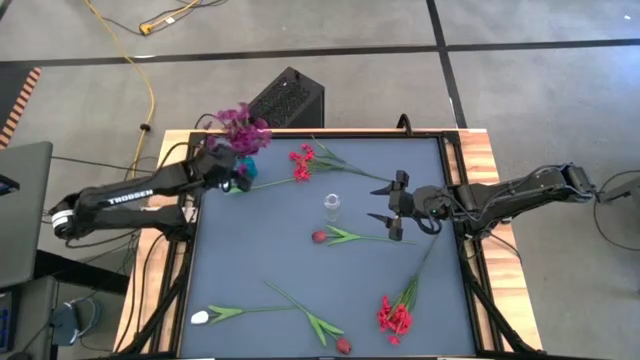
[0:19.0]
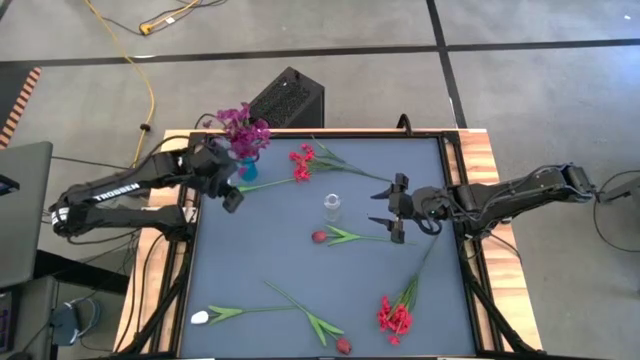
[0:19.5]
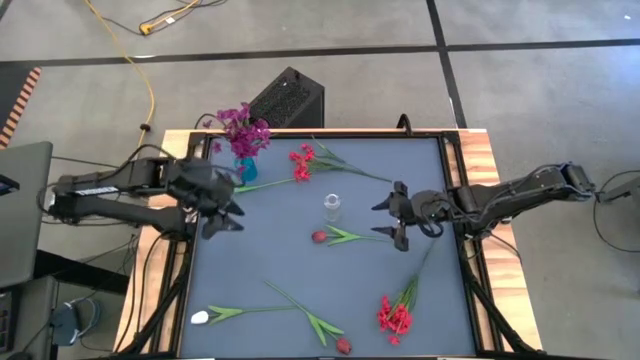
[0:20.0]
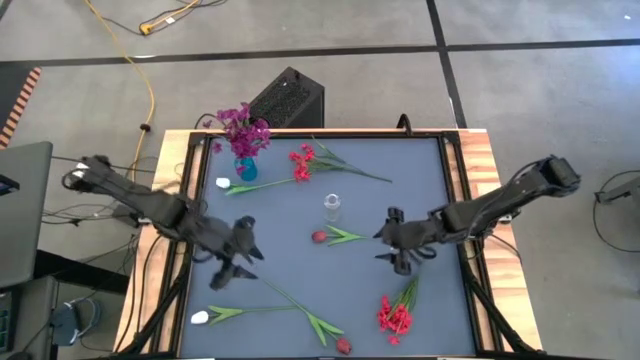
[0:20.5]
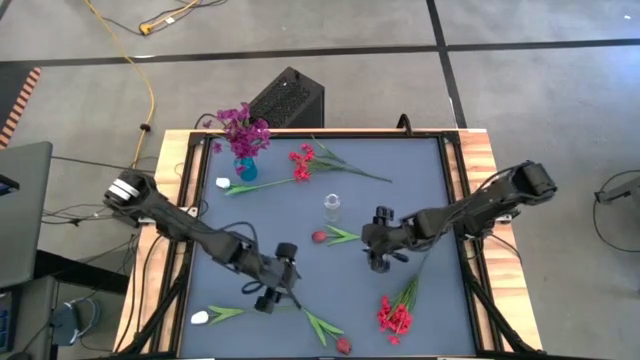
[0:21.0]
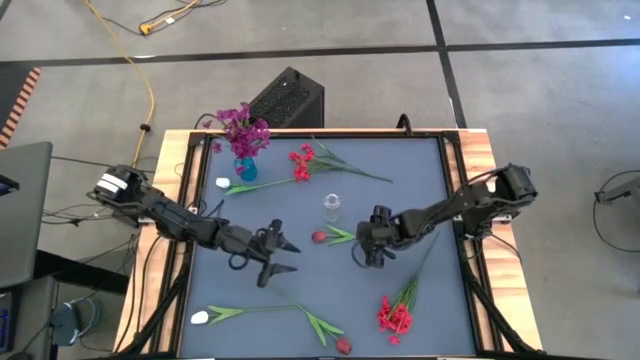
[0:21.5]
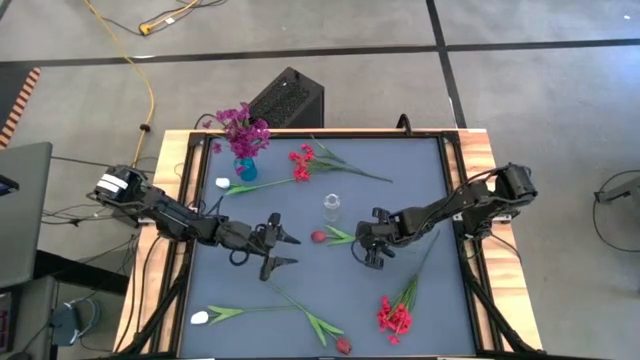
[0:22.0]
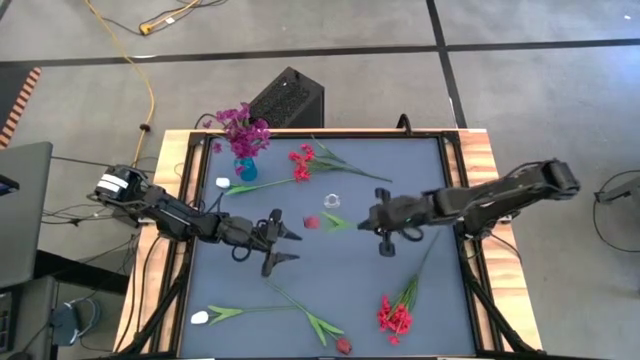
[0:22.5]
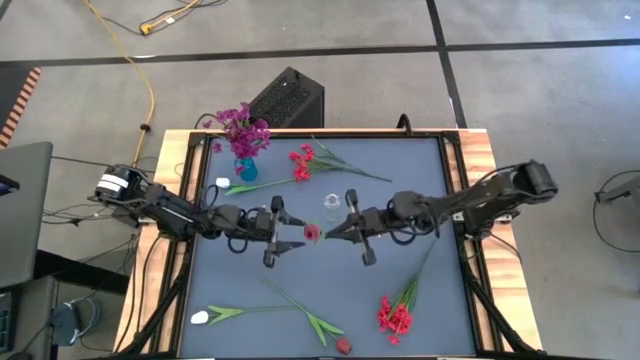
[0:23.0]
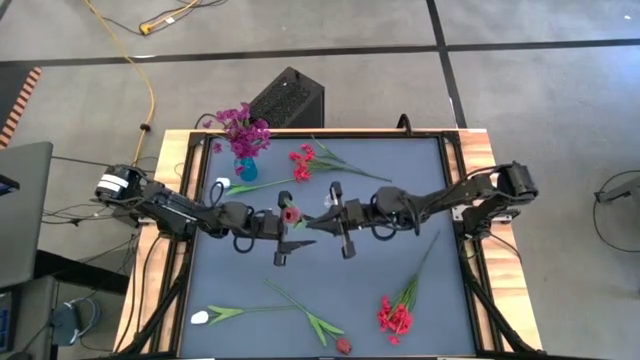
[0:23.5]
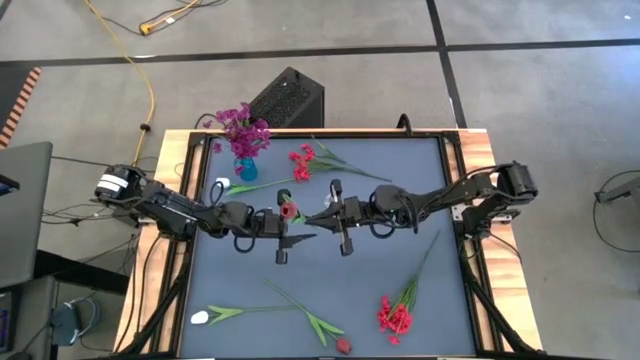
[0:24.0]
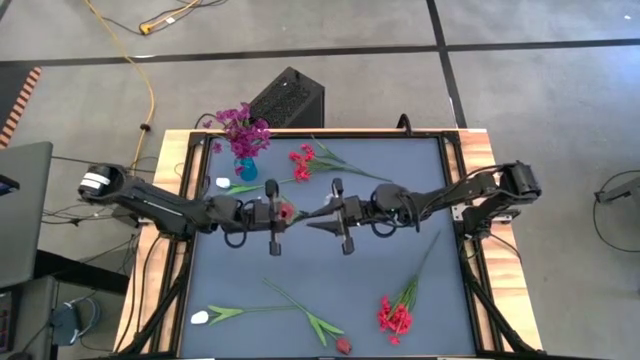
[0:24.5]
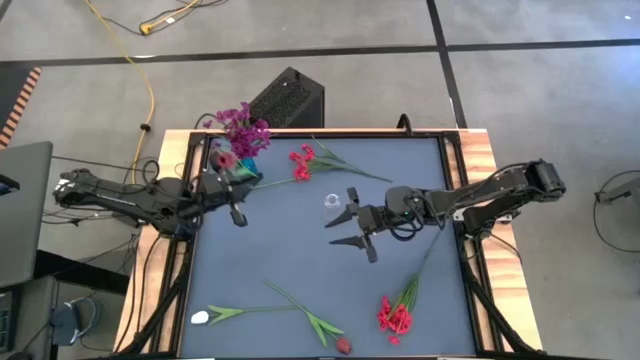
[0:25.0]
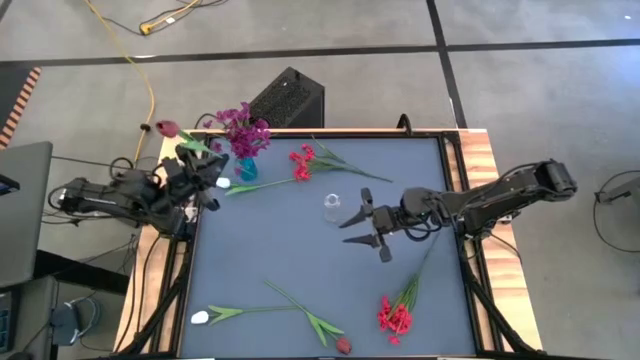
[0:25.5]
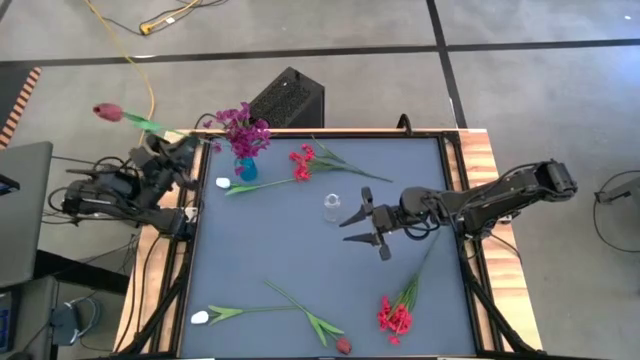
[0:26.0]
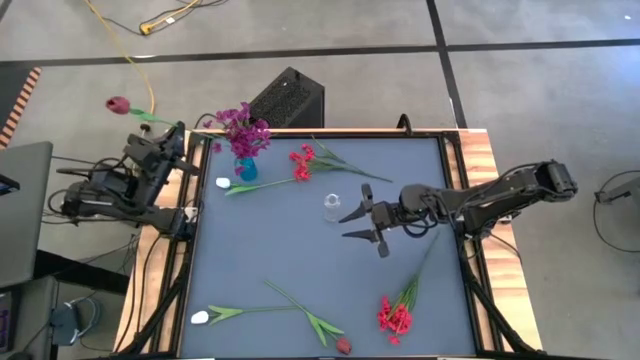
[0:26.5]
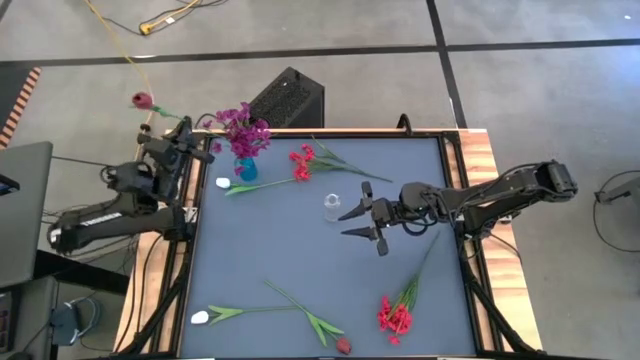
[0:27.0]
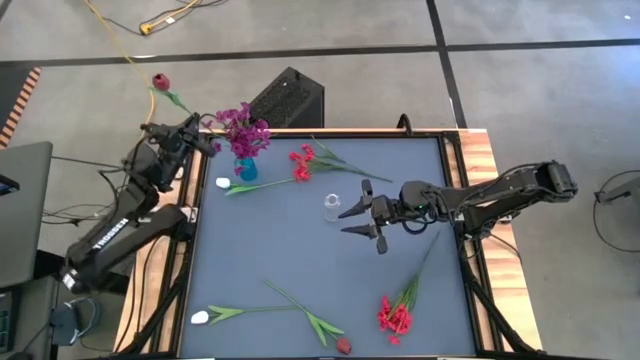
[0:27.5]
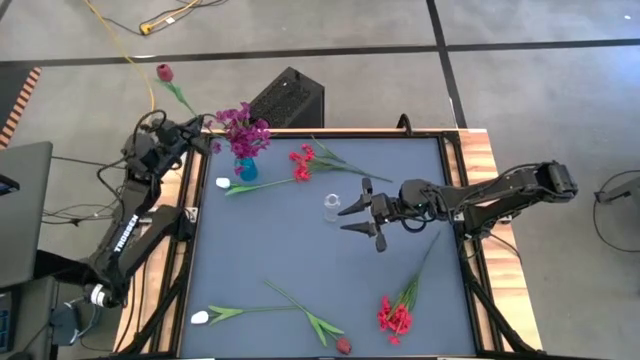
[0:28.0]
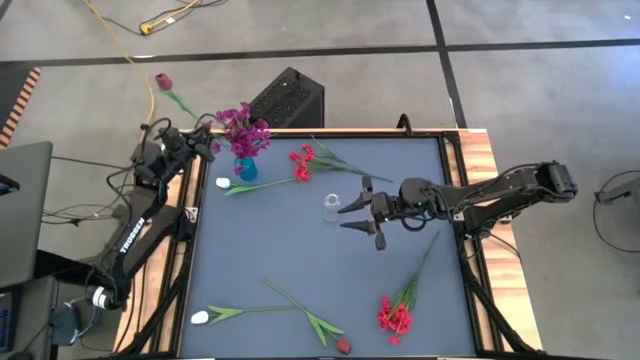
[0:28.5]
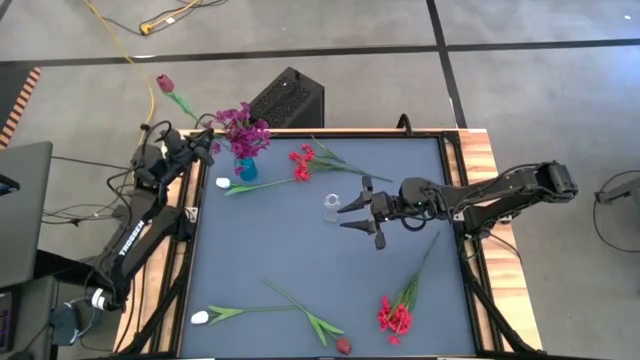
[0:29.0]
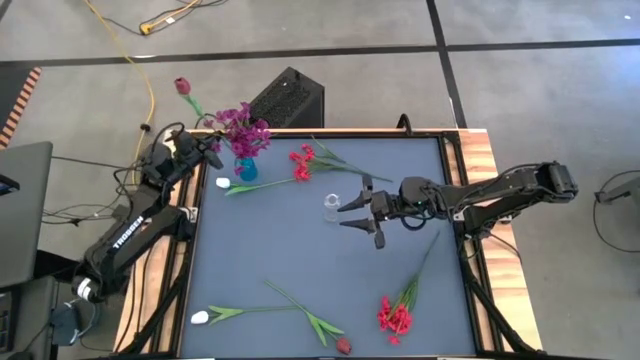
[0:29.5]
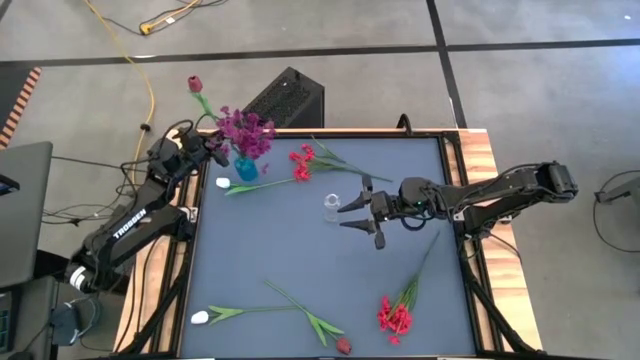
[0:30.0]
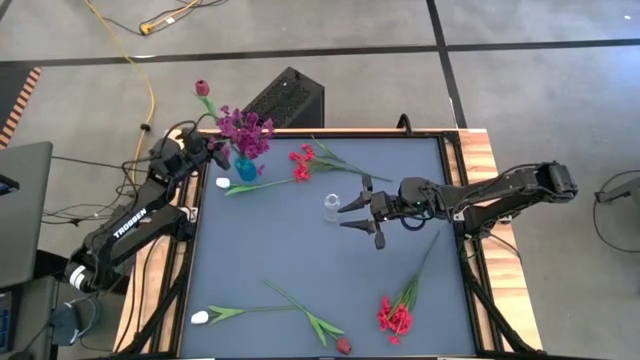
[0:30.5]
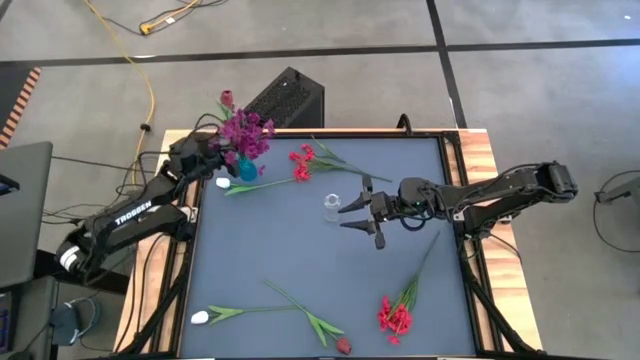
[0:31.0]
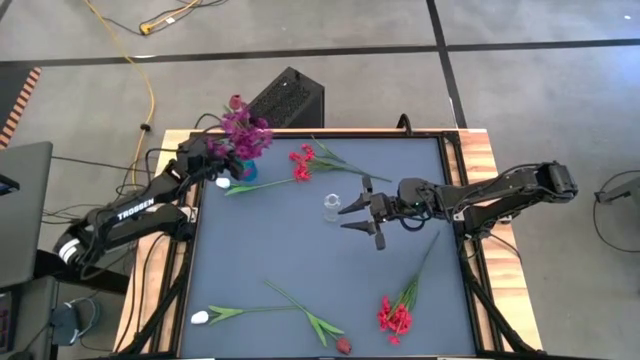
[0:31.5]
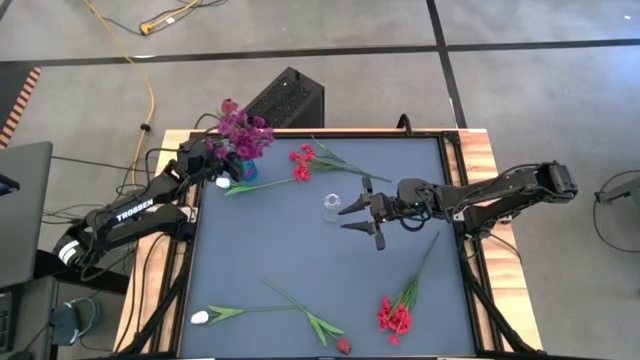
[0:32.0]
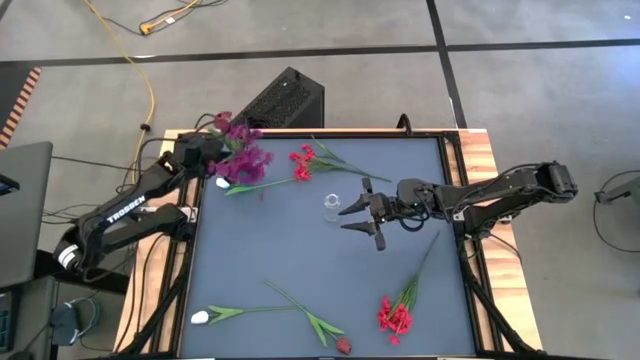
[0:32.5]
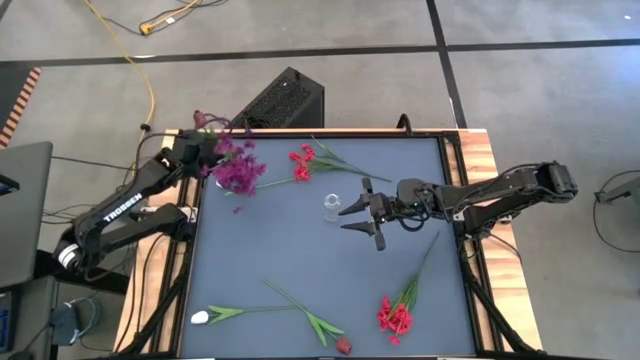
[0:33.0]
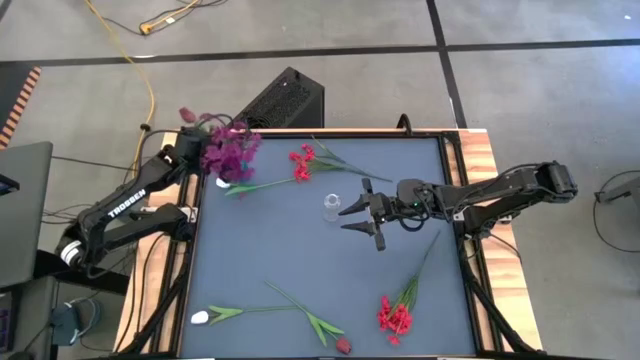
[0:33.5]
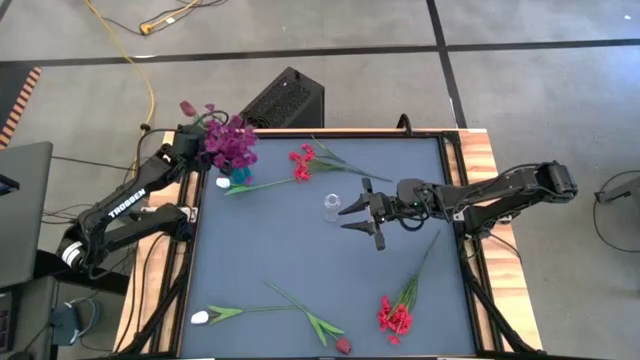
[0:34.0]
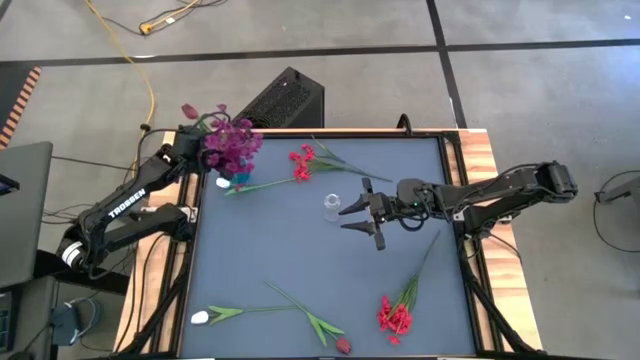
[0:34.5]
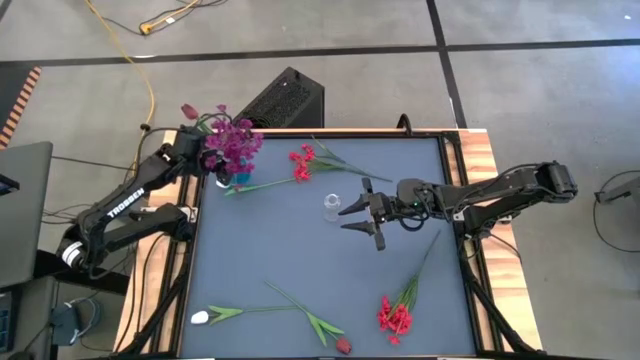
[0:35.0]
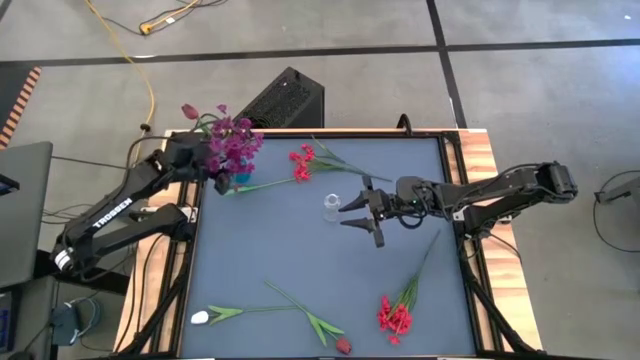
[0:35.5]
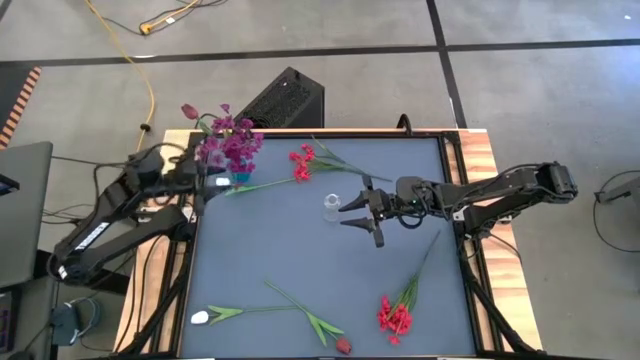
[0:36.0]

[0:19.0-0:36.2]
Task: Sort flowers into vase by color
Put the top dark red tulip into the blue vase
